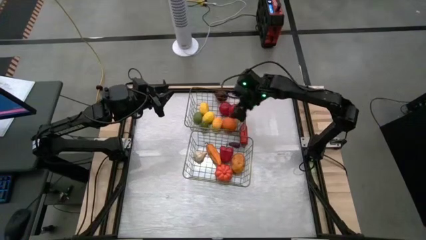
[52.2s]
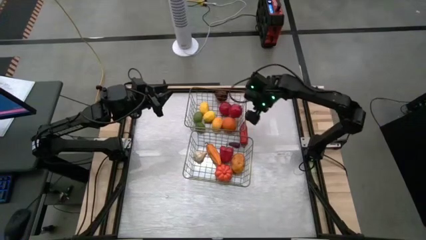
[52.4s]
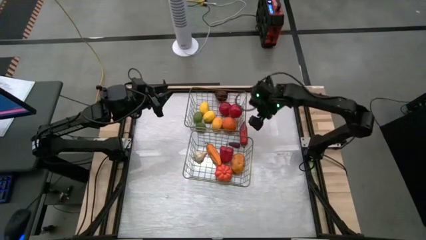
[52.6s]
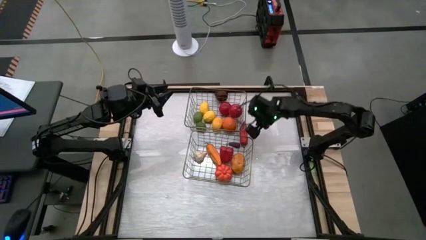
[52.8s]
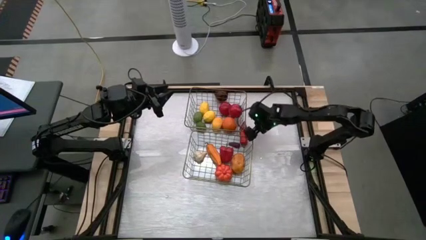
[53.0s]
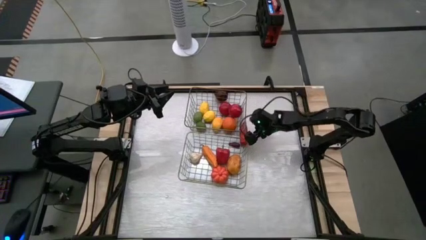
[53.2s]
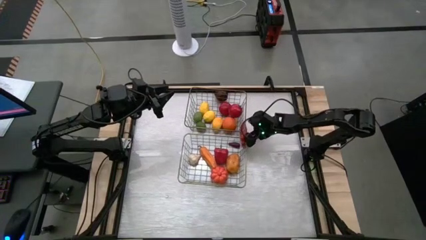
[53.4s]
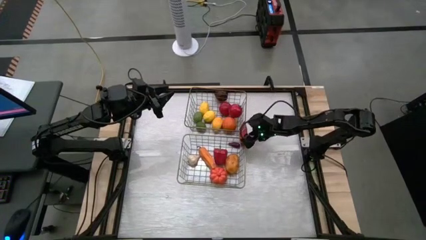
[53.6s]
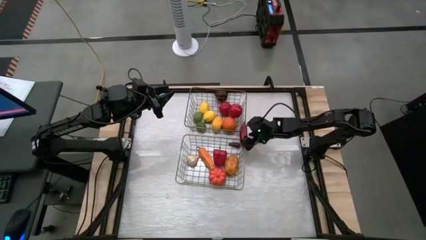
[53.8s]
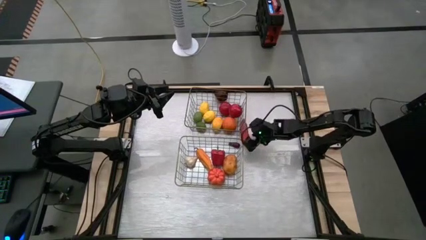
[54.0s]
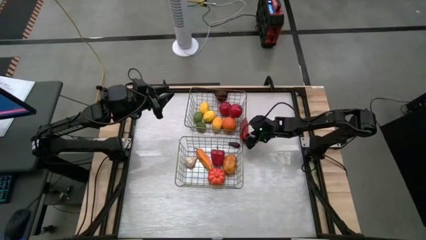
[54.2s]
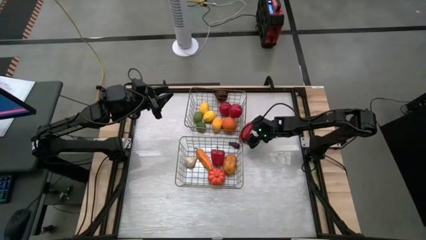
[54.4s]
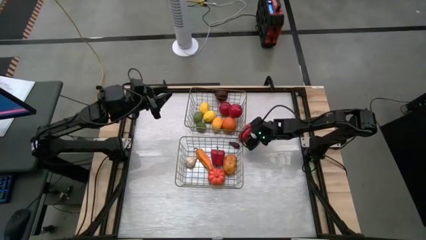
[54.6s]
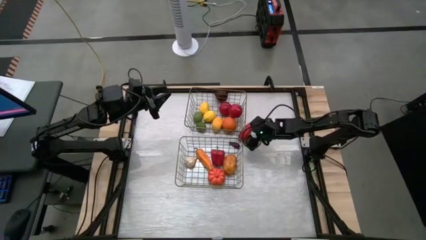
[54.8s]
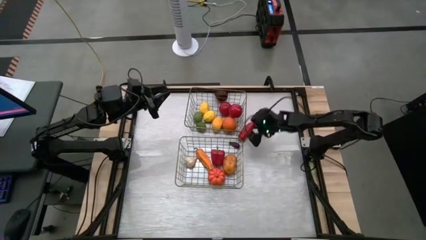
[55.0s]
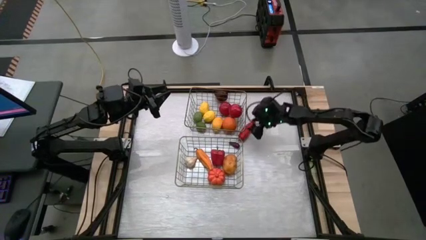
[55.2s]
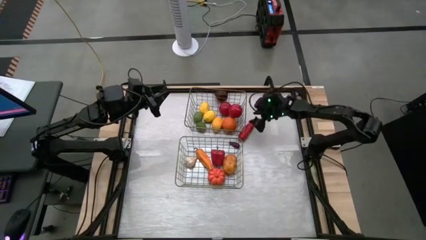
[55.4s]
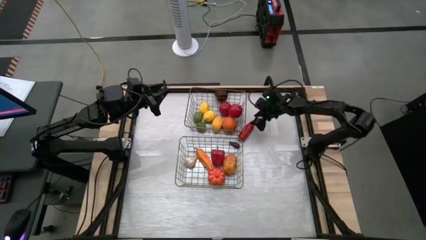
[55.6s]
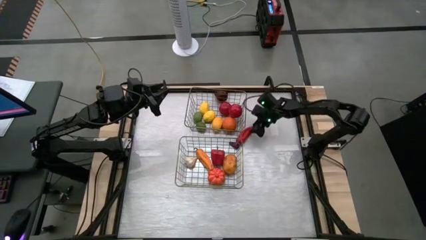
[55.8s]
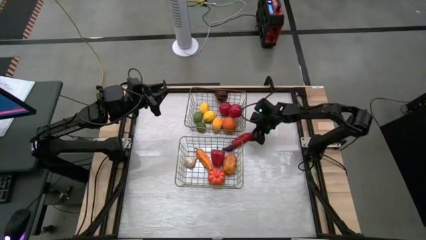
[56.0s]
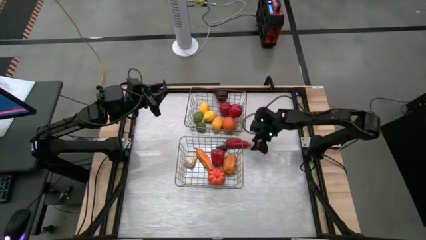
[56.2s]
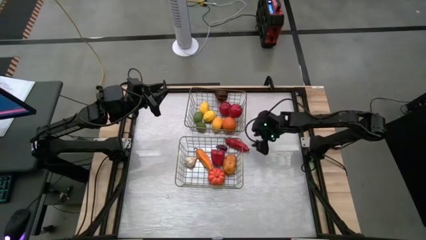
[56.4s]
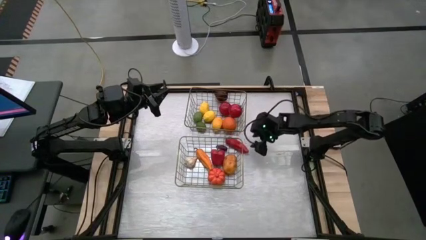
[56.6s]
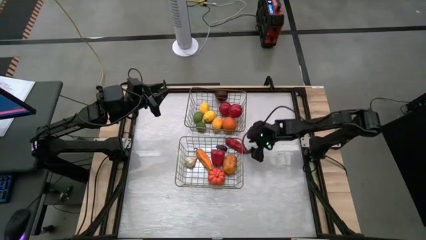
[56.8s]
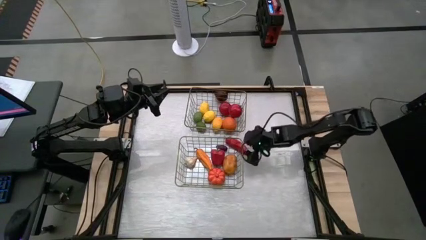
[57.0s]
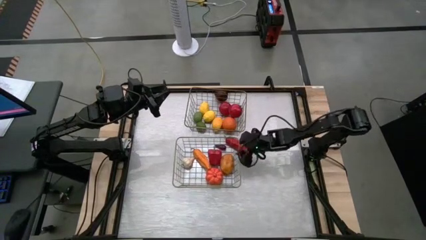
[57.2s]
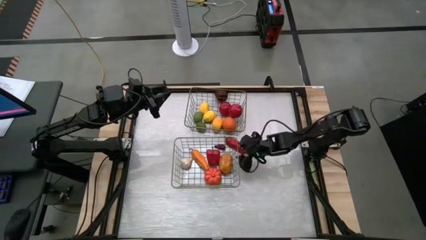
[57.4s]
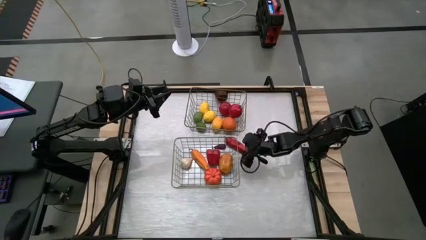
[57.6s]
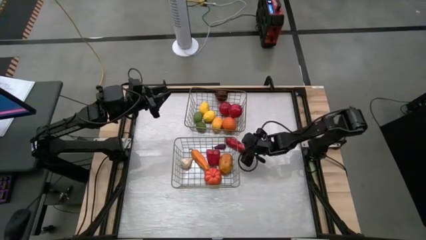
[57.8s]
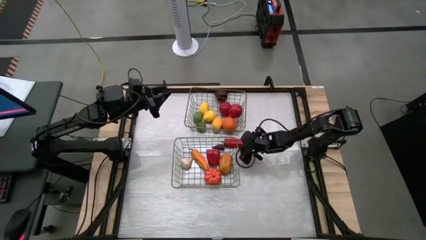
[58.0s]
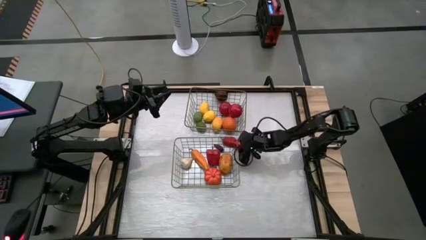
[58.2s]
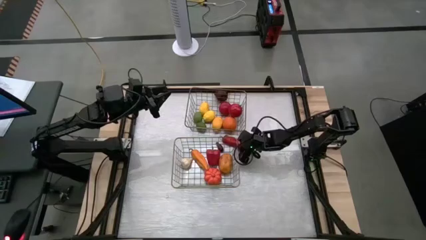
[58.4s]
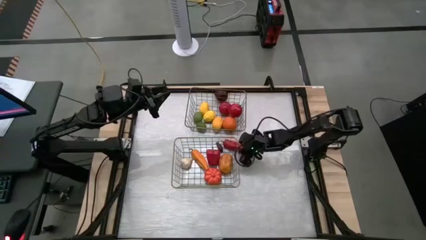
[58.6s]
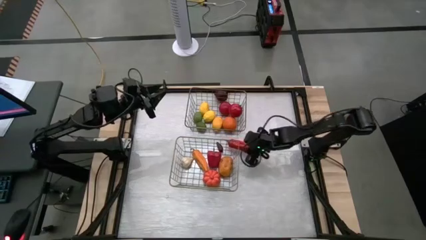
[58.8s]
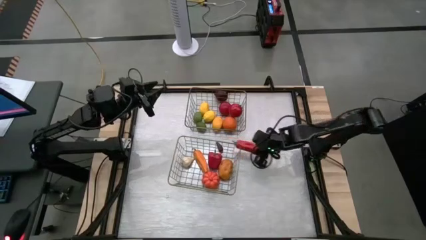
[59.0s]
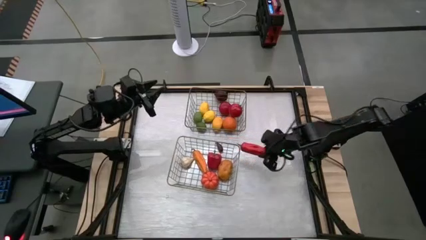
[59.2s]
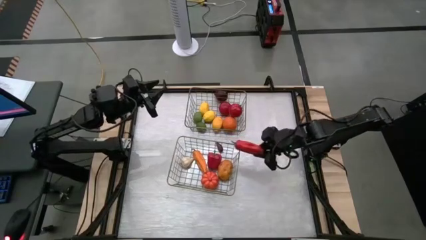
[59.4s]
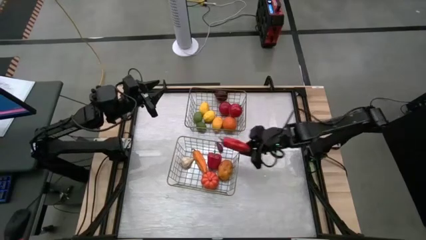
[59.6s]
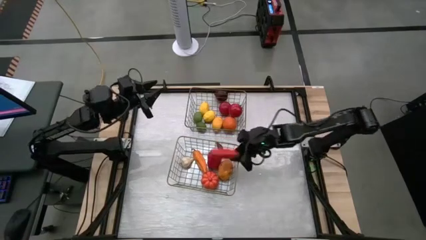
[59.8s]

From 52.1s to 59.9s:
Task: Sort produce into baskets
Put the red bell pepper vegetable into the bottom wire basket

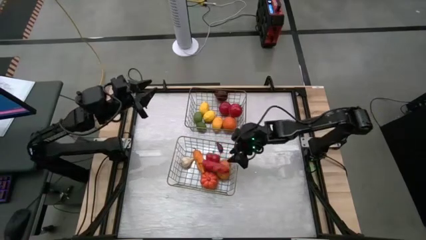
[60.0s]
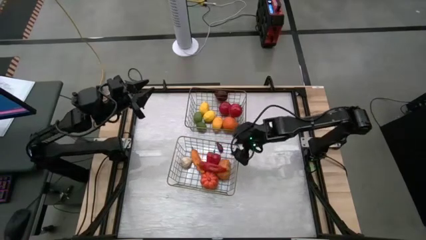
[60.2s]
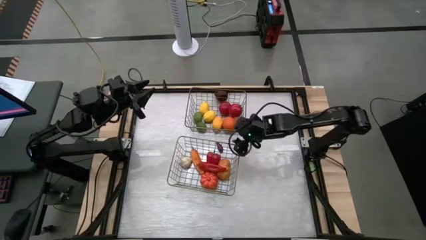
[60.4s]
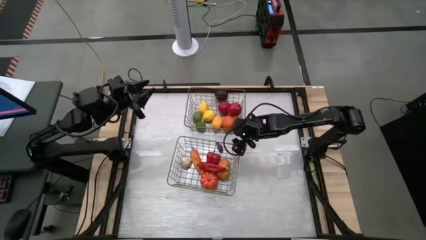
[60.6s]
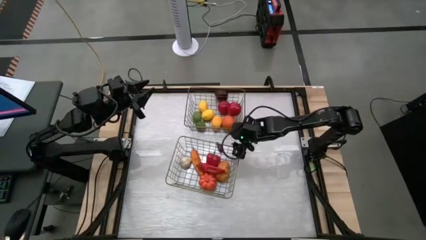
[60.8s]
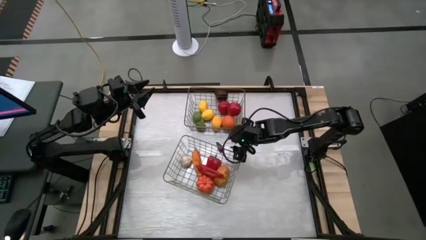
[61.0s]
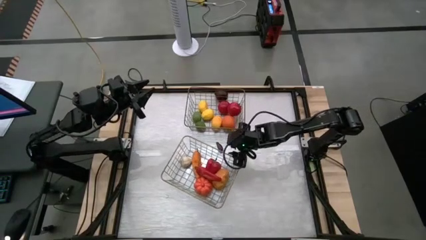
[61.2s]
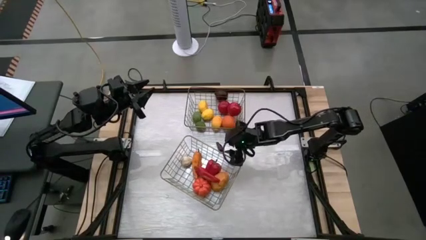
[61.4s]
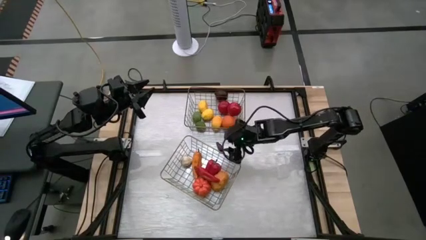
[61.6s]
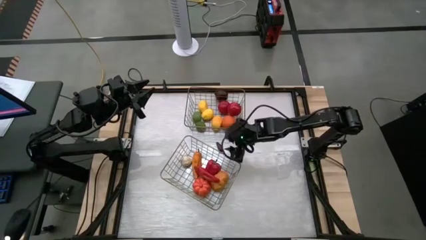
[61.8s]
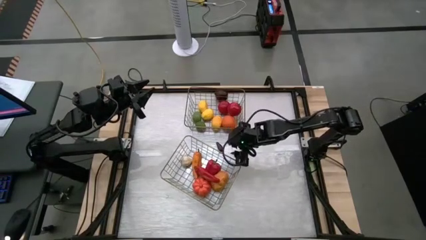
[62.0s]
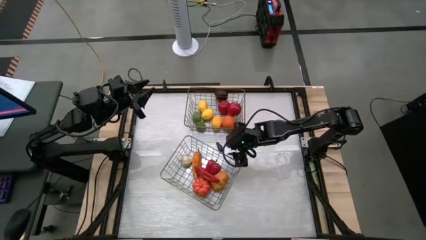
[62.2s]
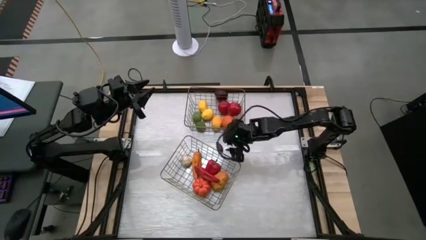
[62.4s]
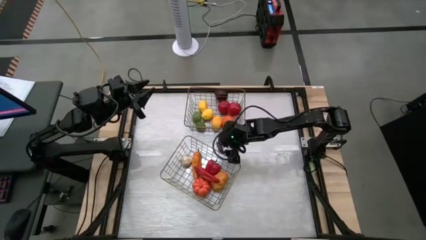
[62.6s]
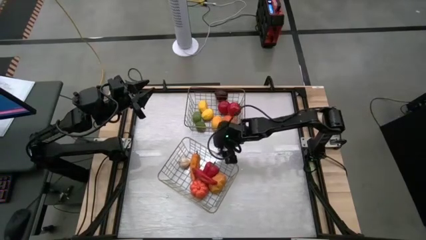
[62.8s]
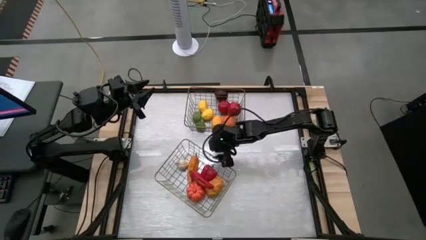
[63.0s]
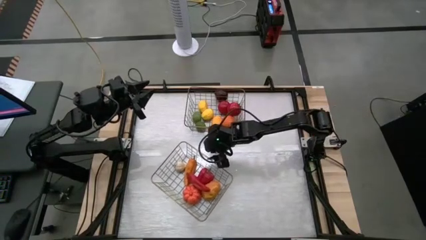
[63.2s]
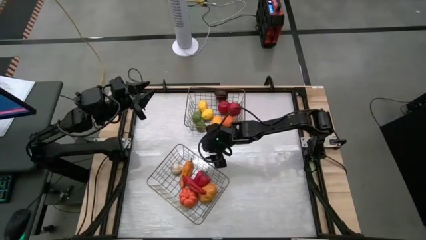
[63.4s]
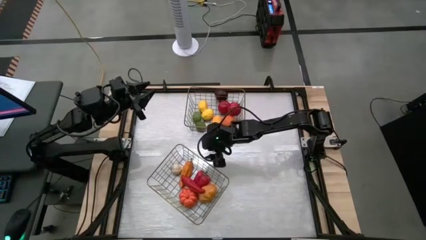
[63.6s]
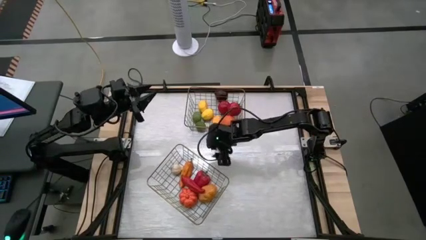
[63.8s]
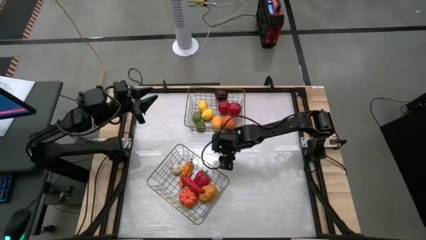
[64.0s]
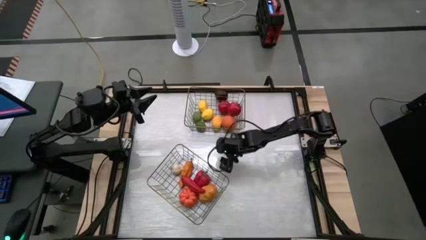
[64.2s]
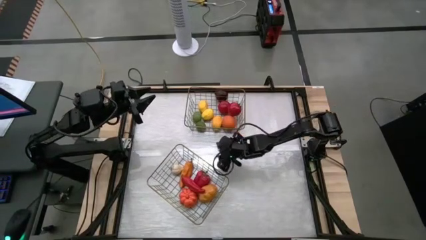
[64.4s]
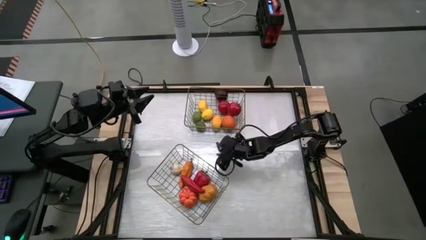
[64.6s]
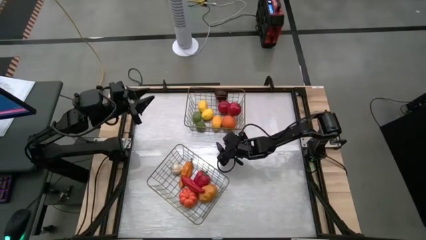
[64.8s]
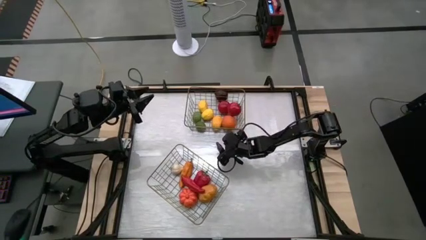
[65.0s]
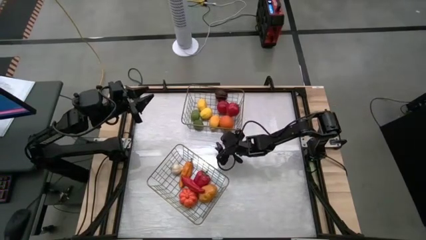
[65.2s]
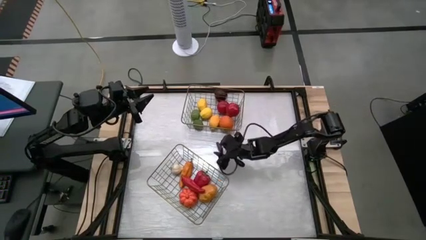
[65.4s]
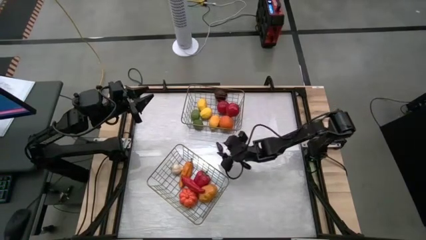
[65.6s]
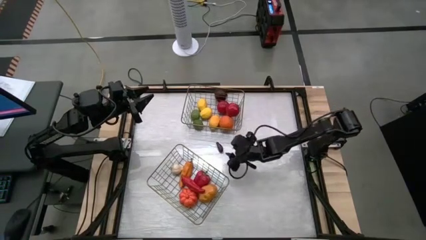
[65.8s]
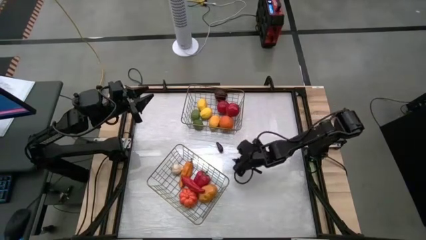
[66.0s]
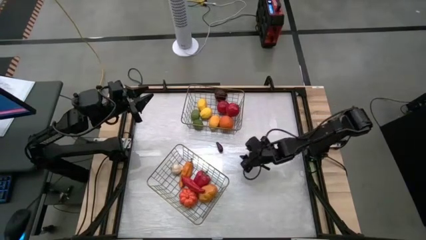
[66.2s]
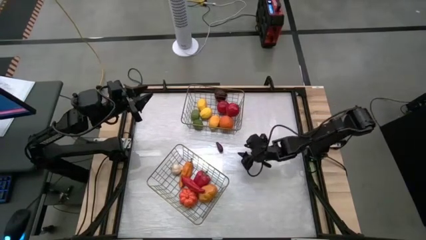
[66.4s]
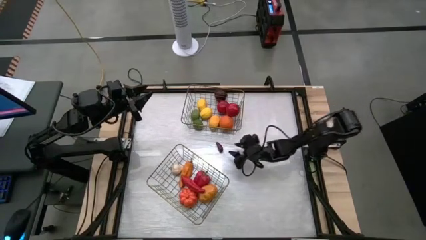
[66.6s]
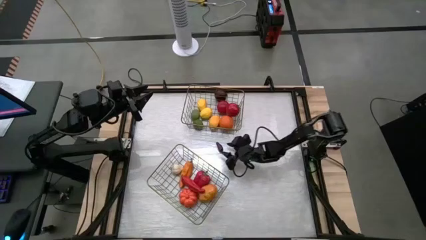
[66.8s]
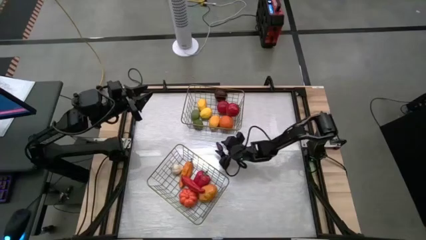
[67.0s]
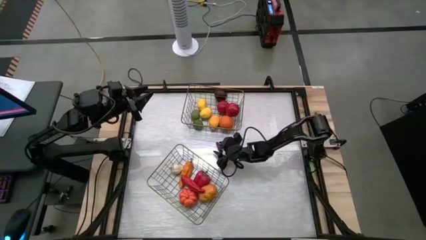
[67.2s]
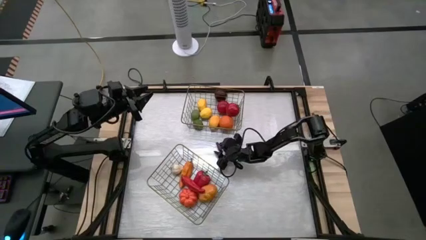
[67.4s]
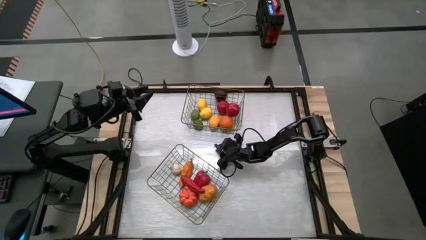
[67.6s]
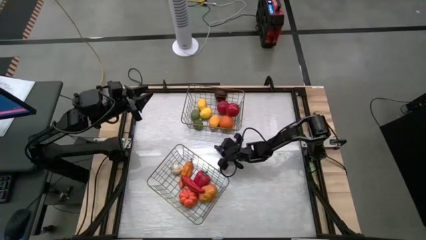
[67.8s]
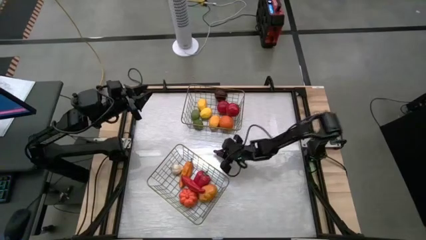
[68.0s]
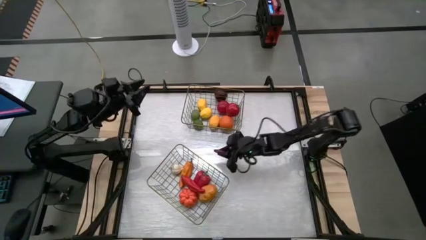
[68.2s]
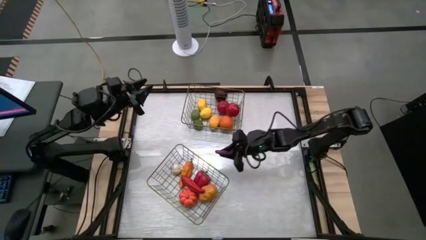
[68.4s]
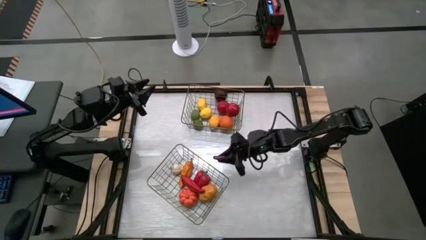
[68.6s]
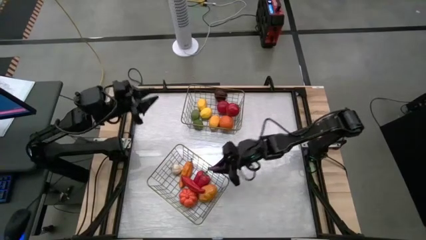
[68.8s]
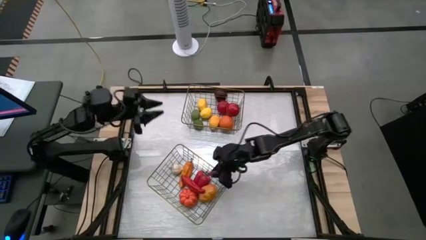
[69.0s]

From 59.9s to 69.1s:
Put the dark purple eggplant vegetable into the bottom wire basket
